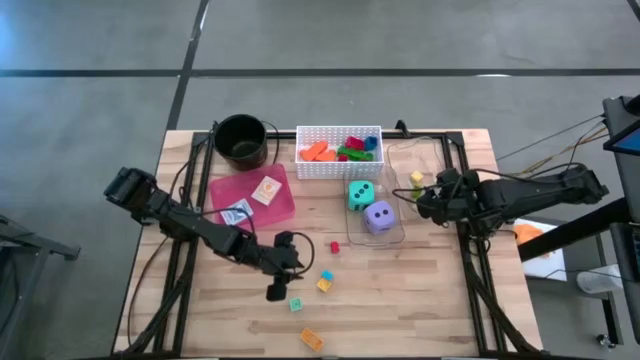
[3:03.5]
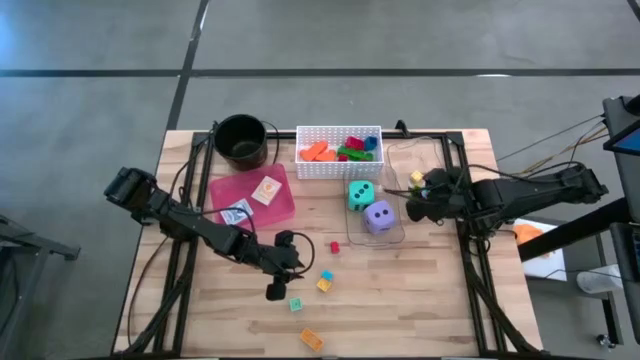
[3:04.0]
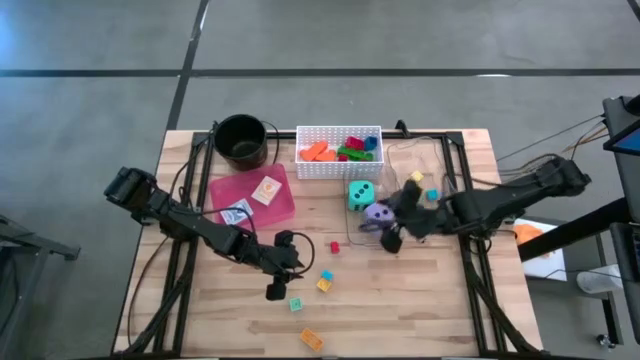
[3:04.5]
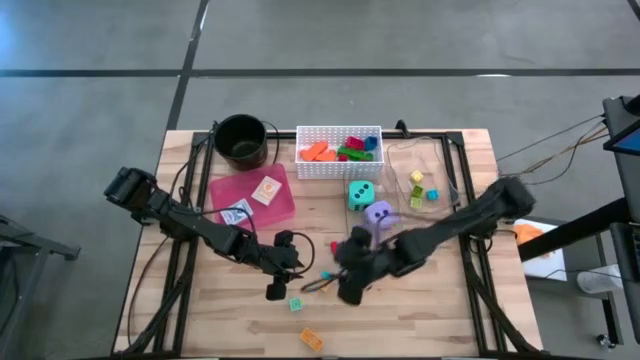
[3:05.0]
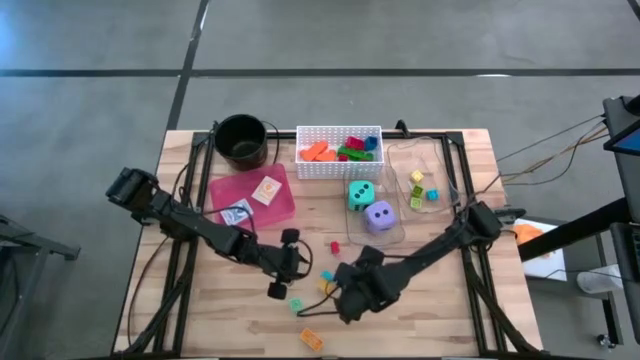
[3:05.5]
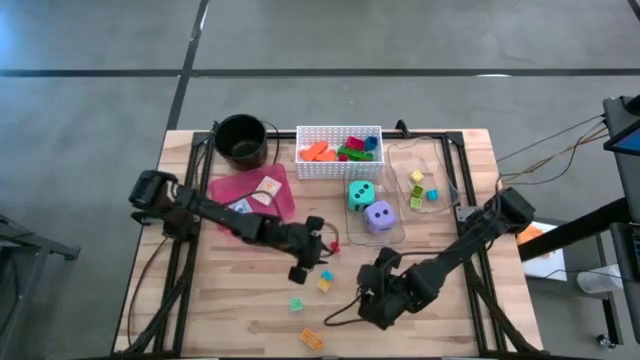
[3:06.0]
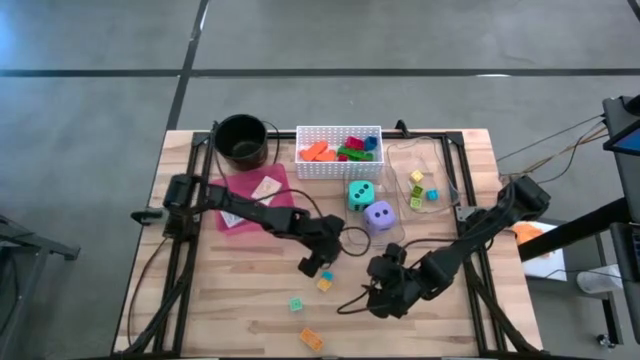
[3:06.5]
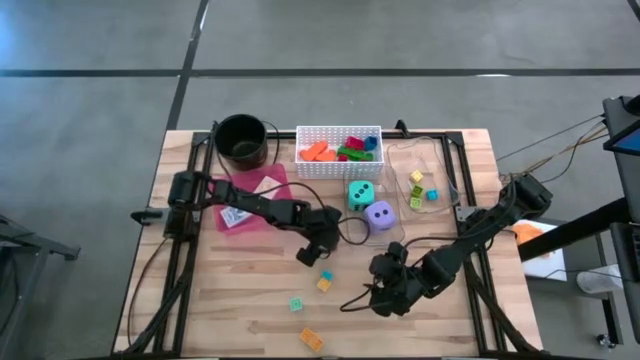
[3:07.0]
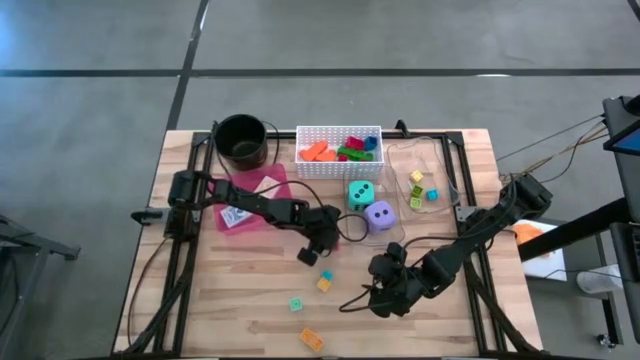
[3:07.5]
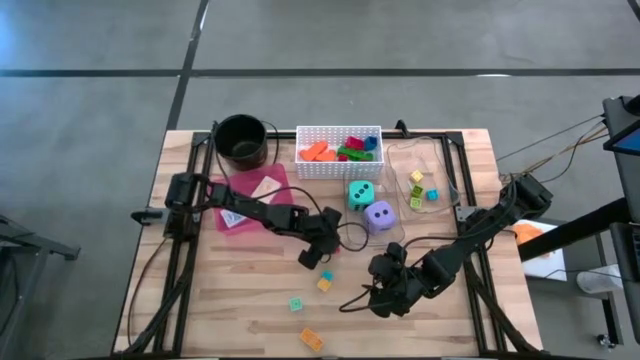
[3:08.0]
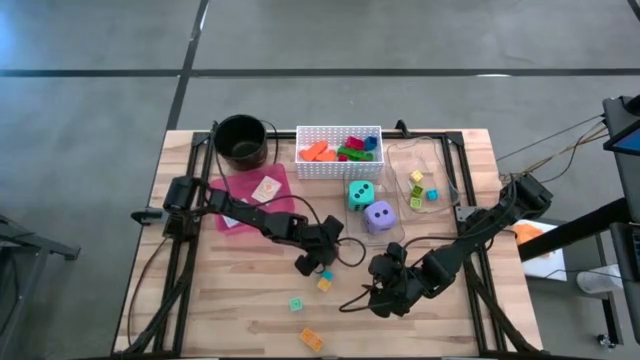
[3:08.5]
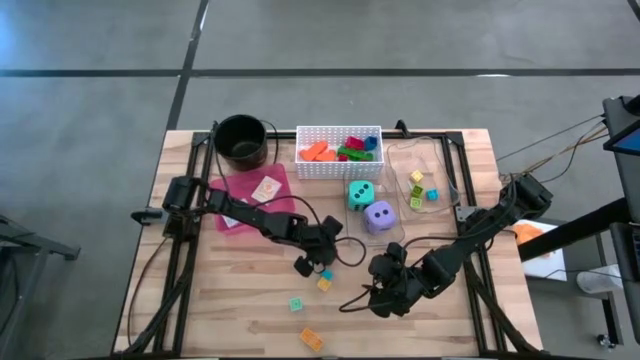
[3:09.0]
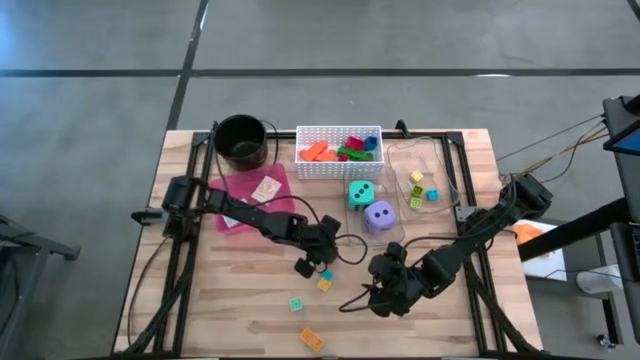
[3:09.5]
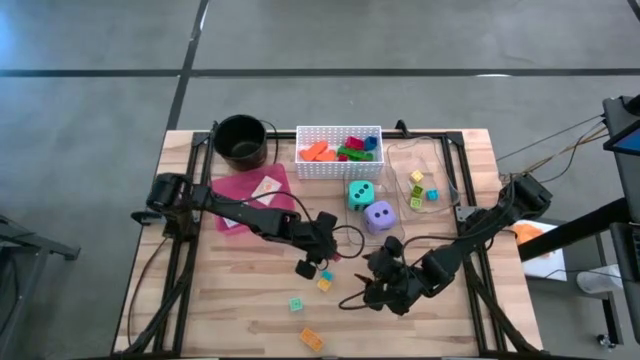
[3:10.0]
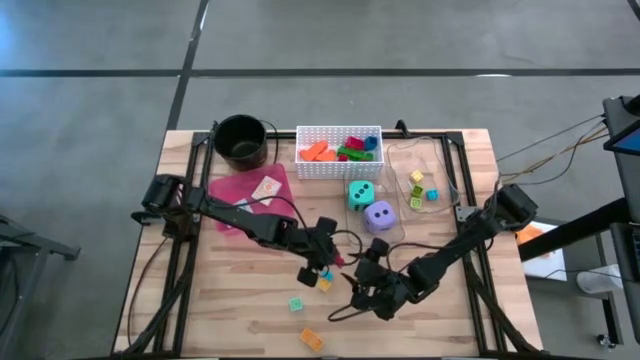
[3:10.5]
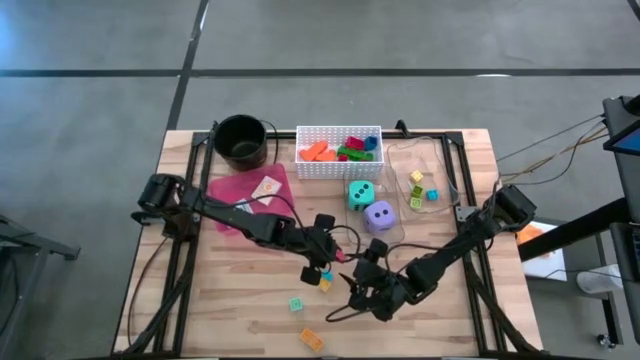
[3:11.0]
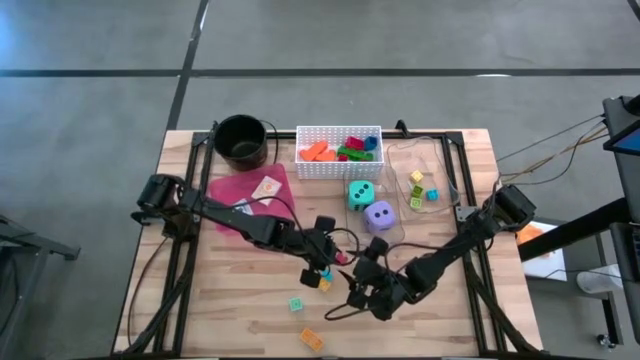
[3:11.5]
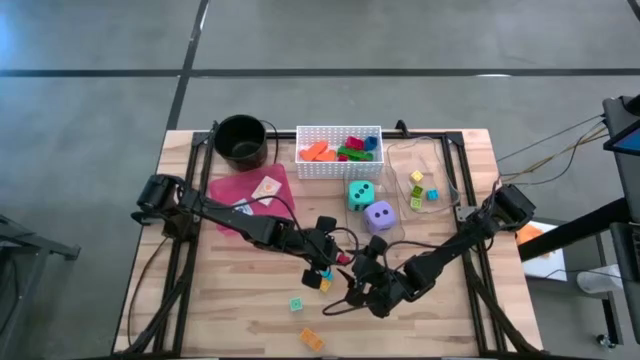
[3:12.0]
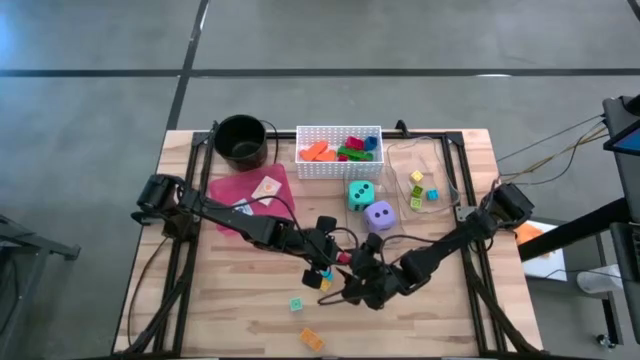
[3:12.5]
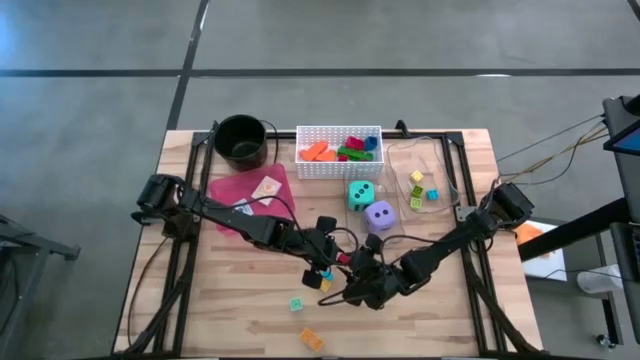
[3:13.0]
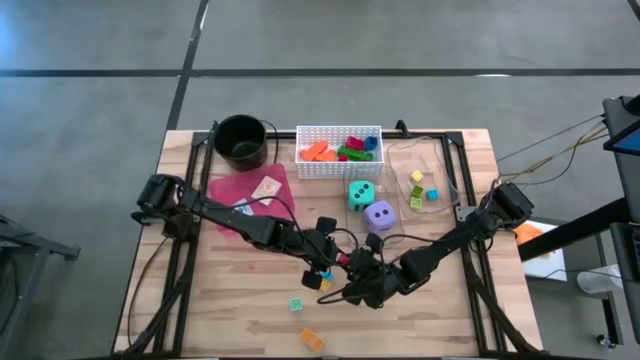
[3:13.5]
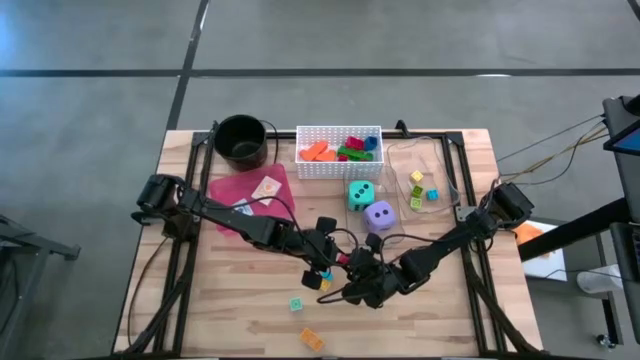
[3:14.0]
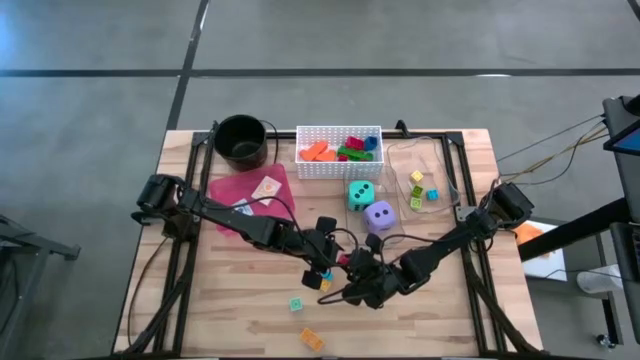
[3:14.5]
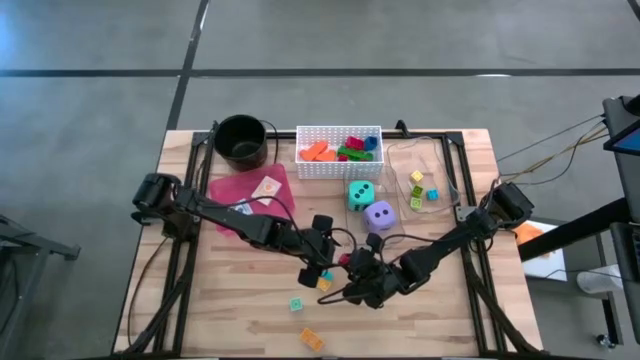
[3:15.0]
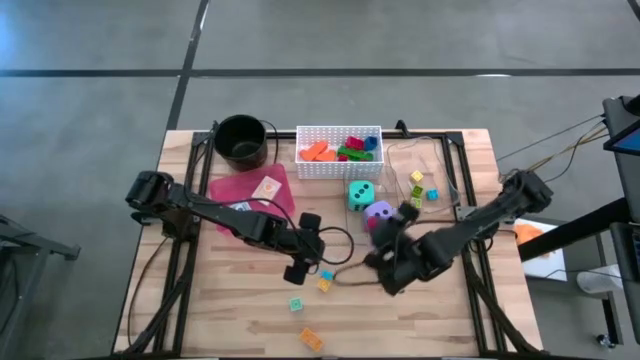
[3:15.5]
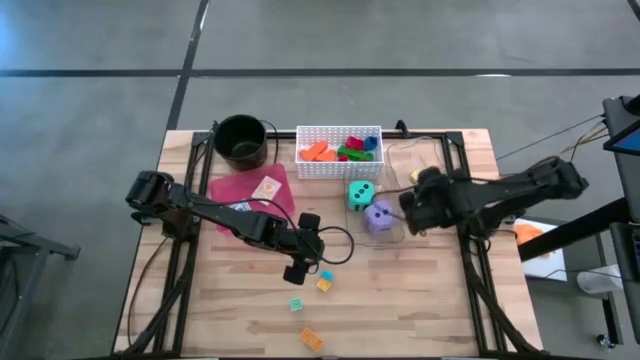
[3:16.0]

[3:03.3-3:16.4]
Task: Pick & Place Toys
Put the small red game piece into the right transparent bin

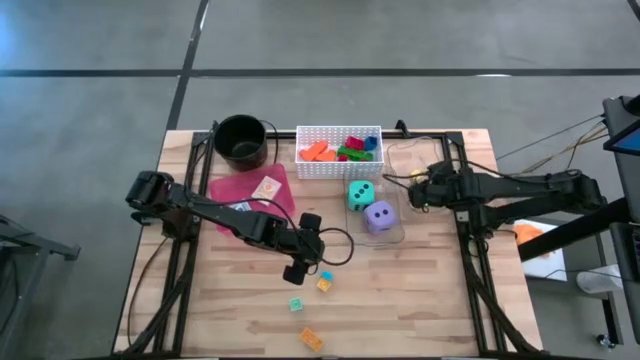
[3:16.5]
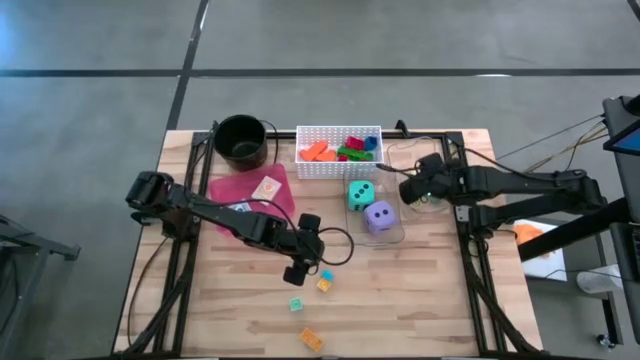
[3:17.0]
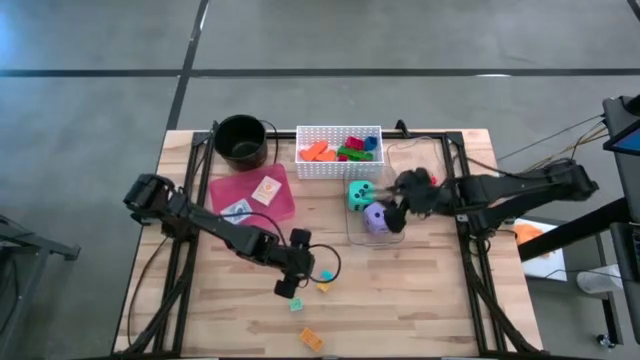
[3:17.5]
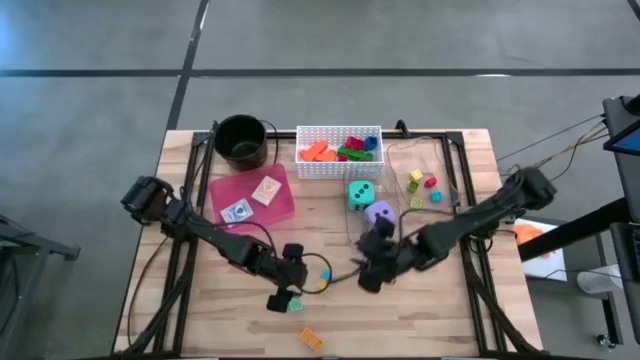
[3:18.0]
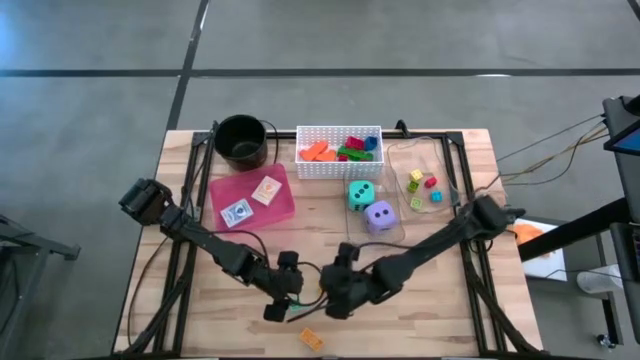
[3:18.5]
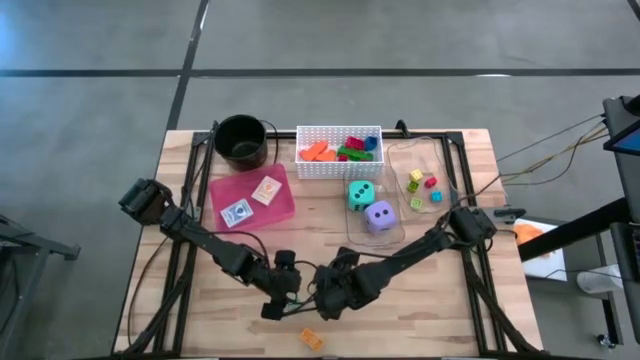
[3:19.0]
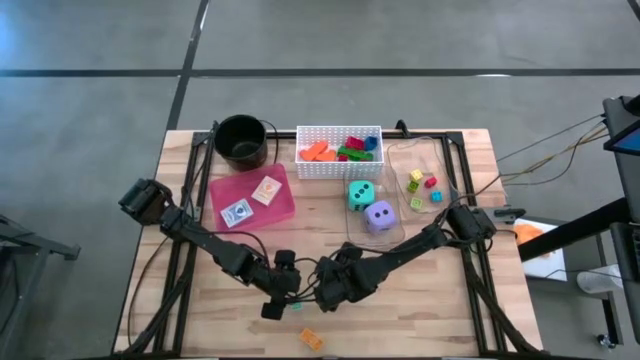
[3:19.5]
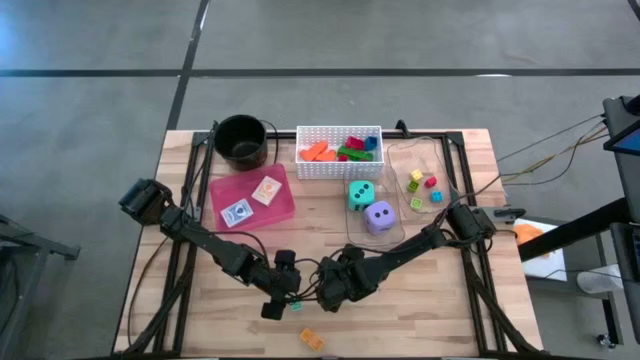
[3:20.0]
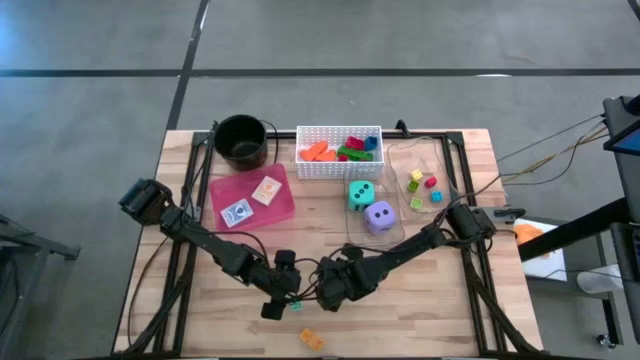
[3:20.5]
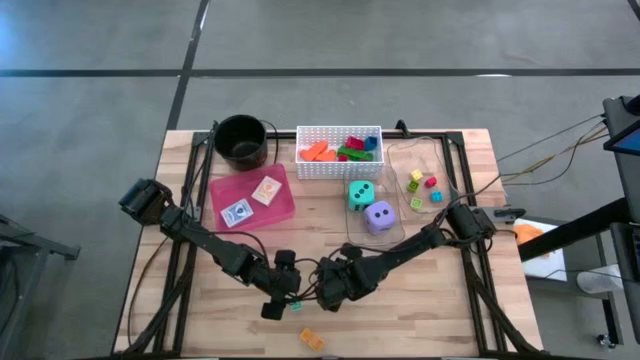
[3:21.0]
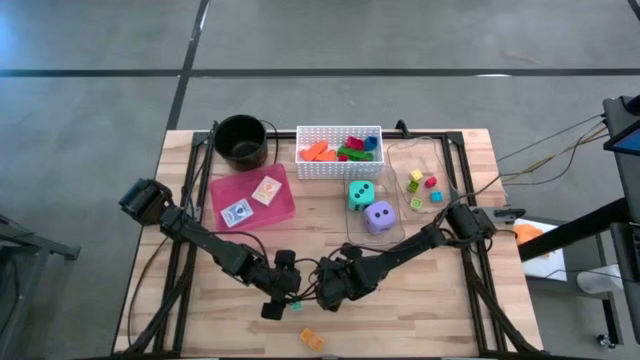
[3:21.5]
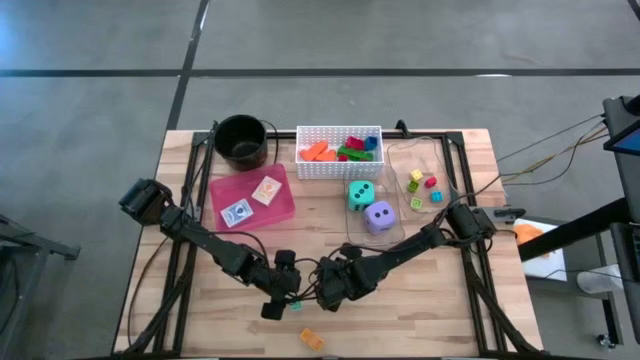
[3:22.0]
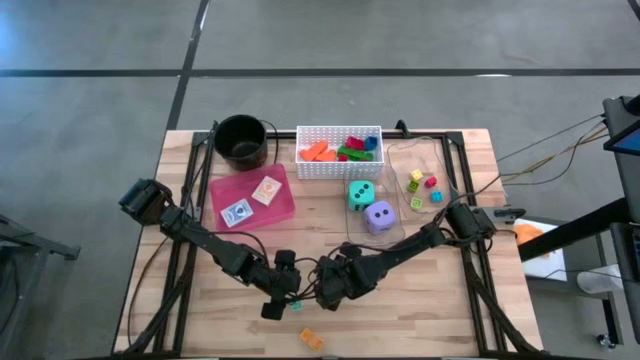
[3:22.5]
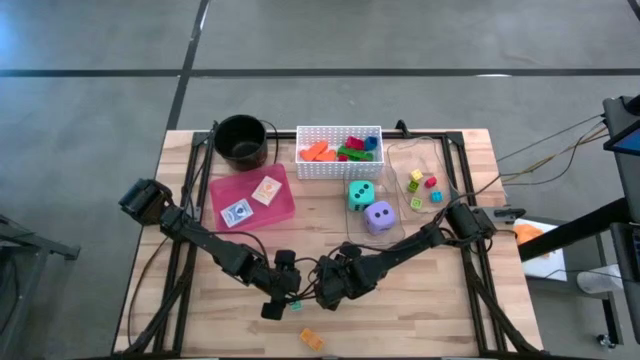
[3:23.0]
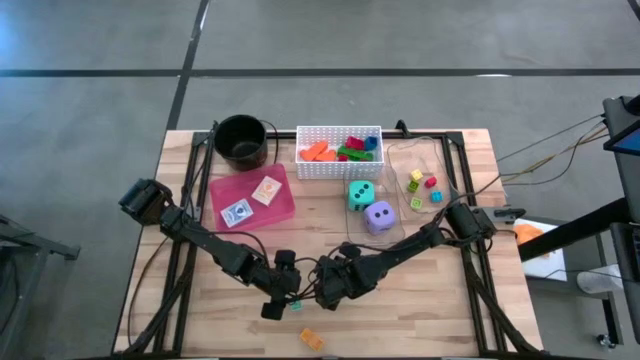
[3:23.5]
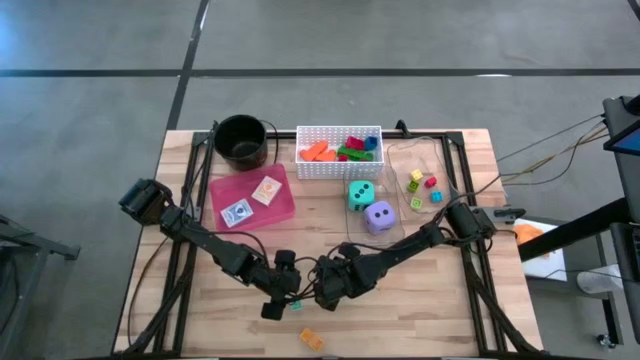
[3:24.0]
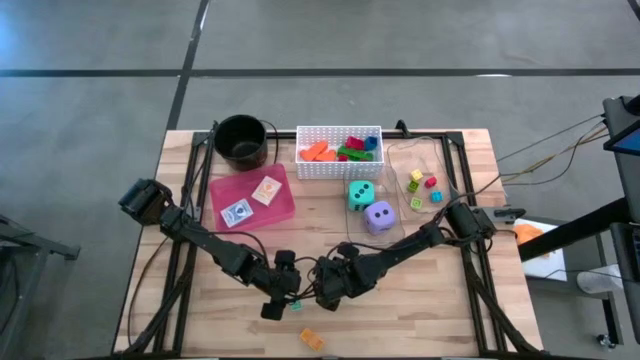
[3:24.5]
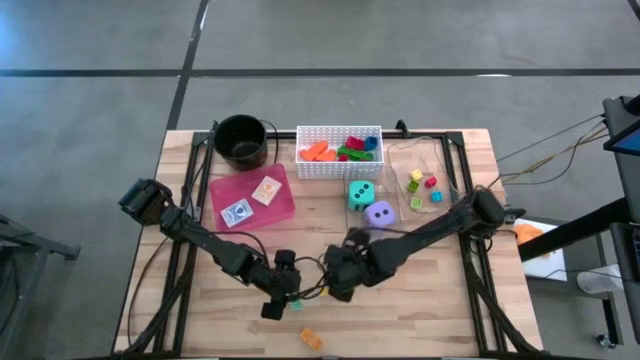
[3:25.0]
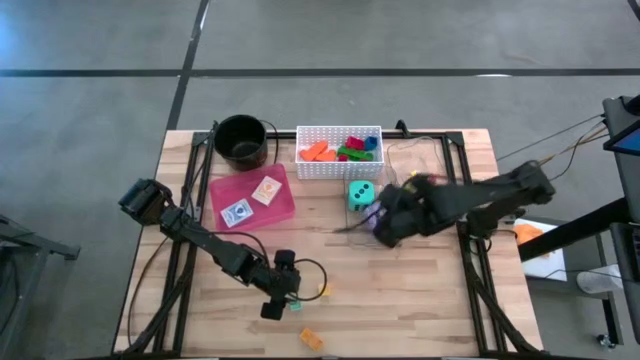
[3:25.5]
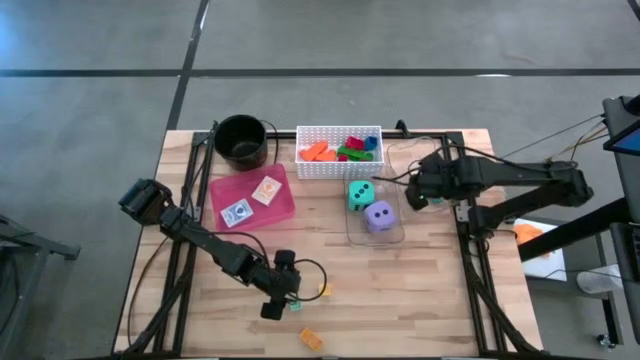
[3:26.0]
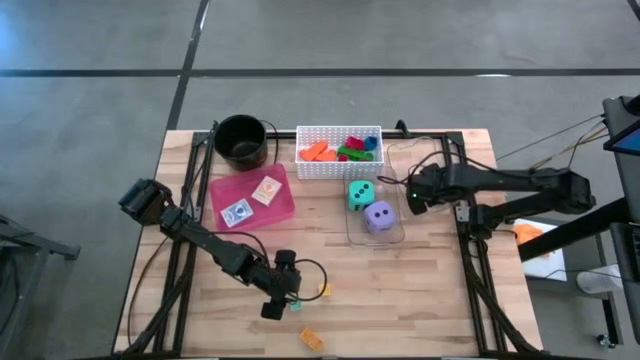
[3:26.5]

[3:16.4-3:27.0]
Put the small dark blue game piece into the right transparent bin
